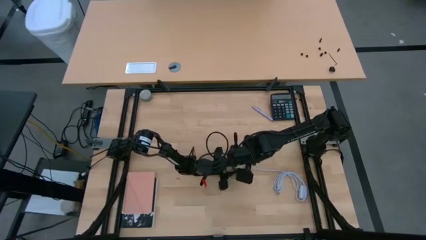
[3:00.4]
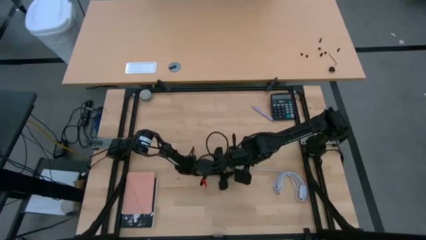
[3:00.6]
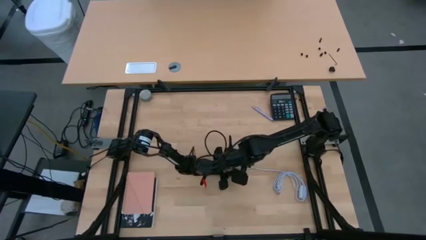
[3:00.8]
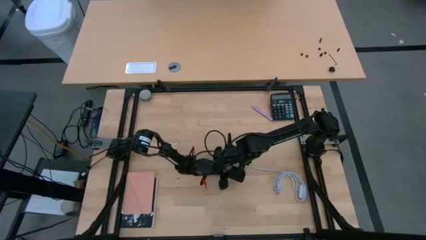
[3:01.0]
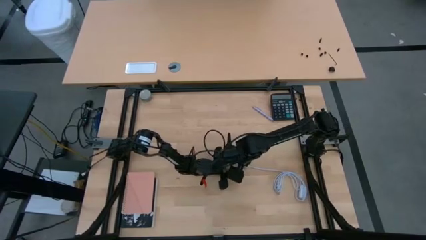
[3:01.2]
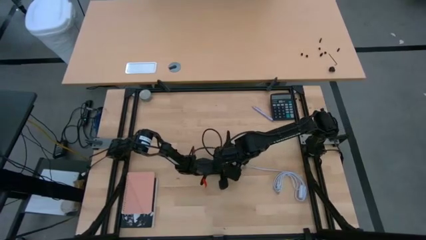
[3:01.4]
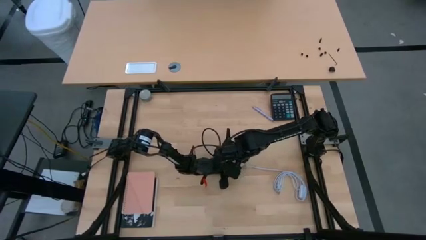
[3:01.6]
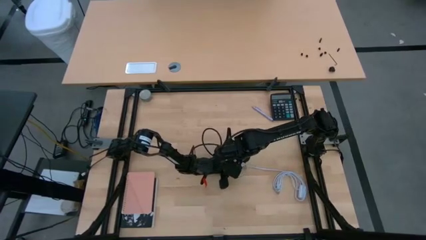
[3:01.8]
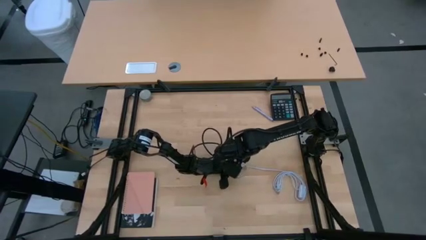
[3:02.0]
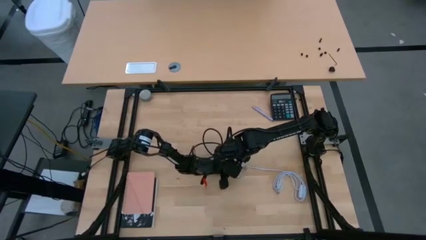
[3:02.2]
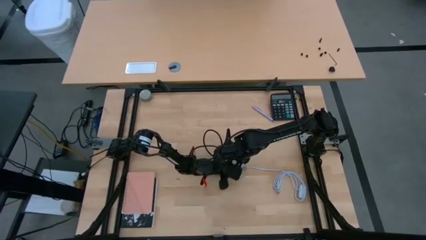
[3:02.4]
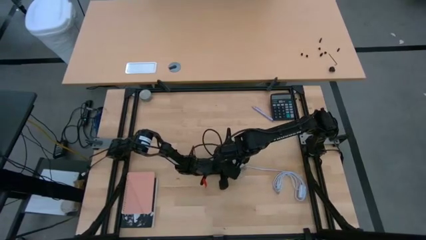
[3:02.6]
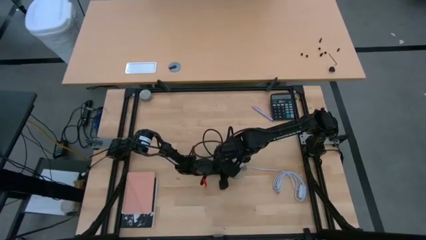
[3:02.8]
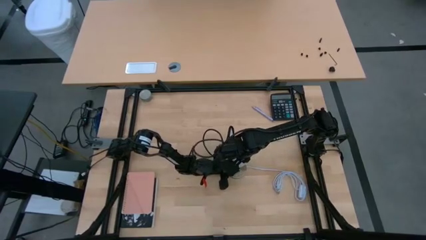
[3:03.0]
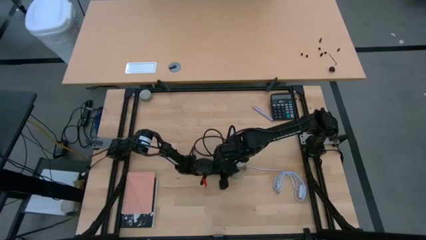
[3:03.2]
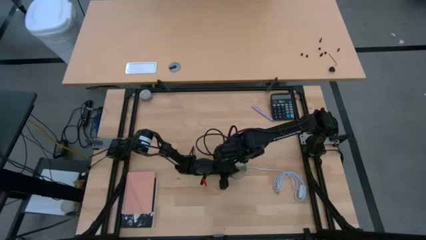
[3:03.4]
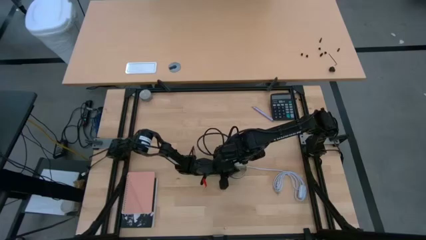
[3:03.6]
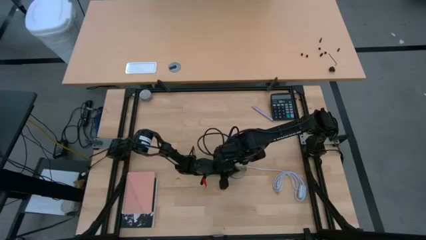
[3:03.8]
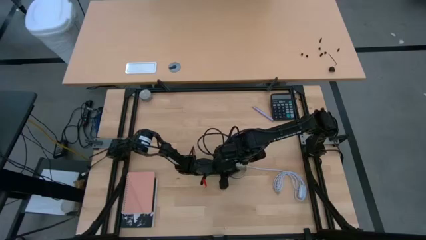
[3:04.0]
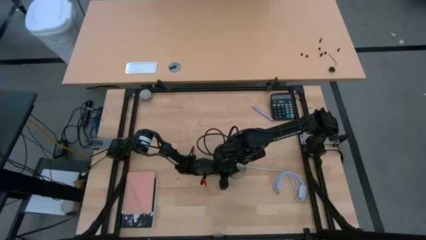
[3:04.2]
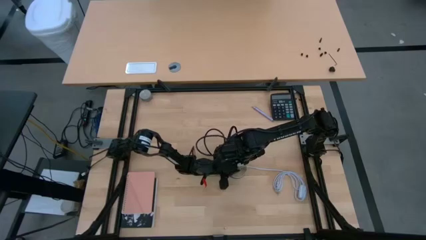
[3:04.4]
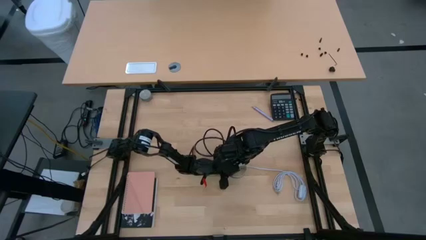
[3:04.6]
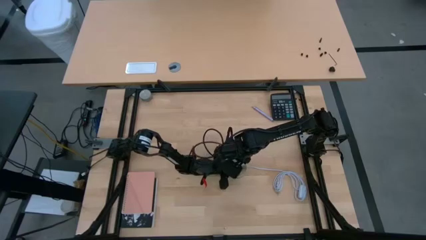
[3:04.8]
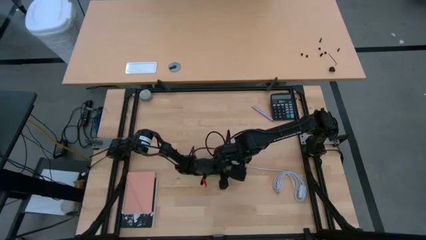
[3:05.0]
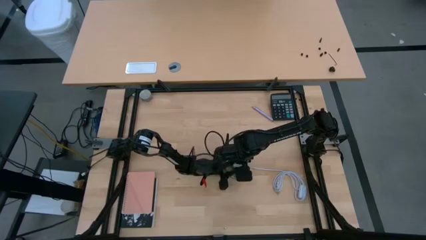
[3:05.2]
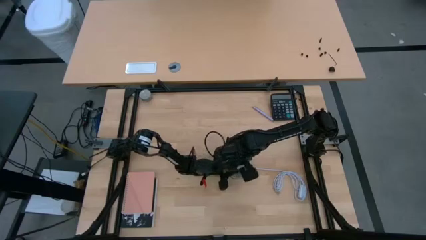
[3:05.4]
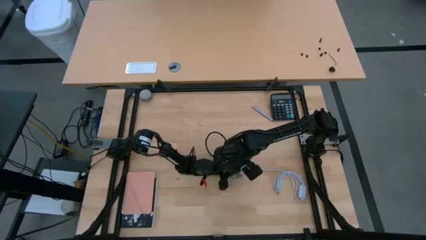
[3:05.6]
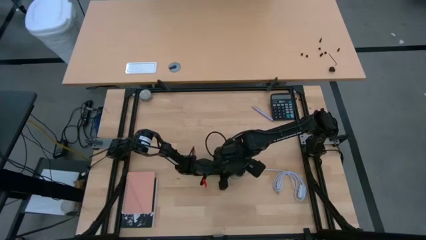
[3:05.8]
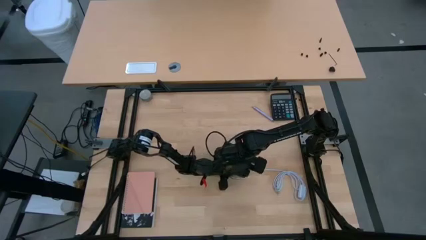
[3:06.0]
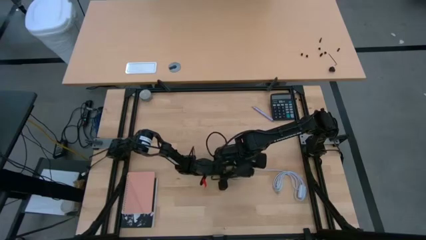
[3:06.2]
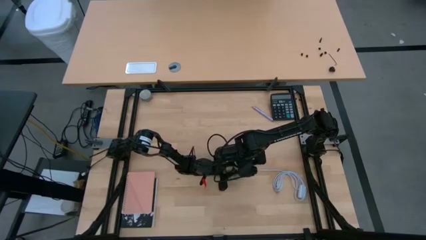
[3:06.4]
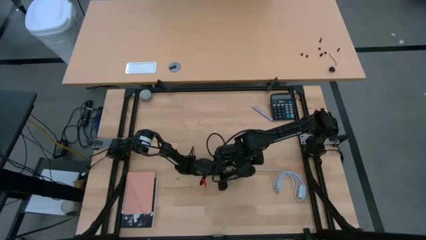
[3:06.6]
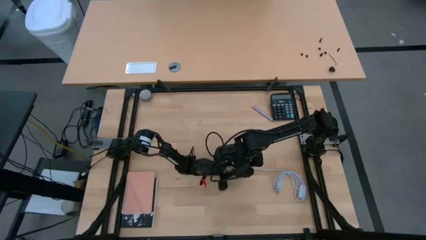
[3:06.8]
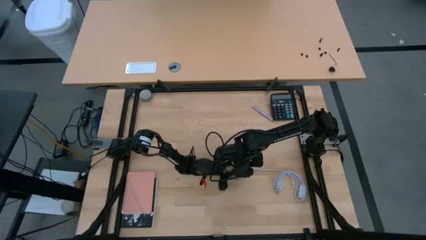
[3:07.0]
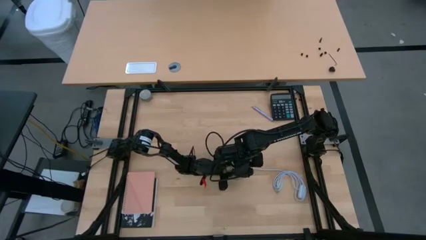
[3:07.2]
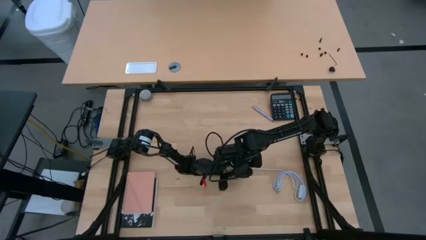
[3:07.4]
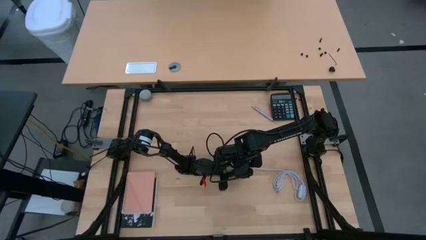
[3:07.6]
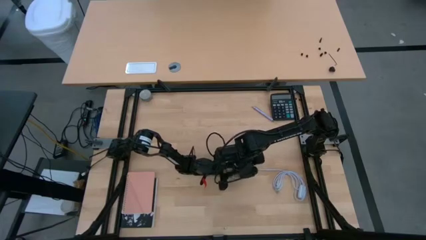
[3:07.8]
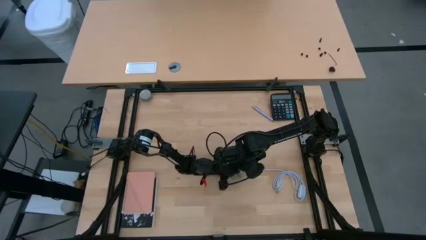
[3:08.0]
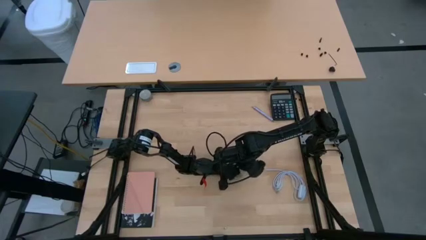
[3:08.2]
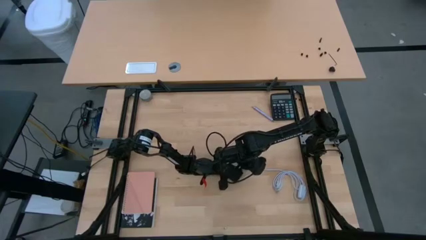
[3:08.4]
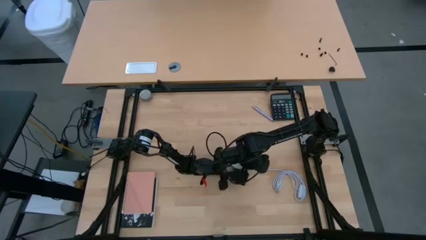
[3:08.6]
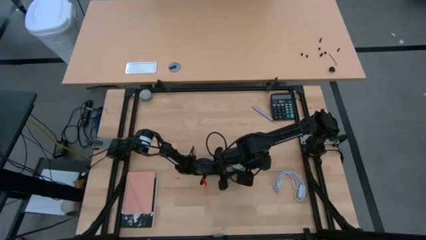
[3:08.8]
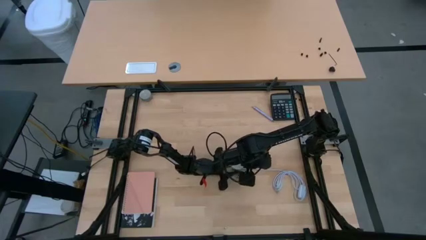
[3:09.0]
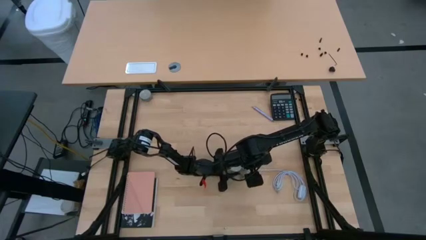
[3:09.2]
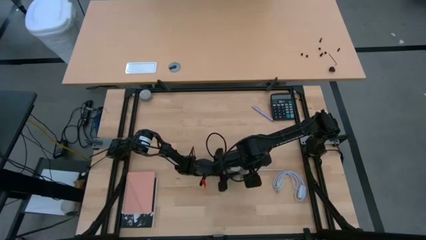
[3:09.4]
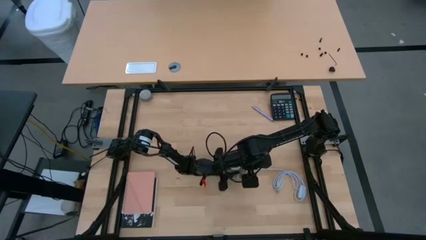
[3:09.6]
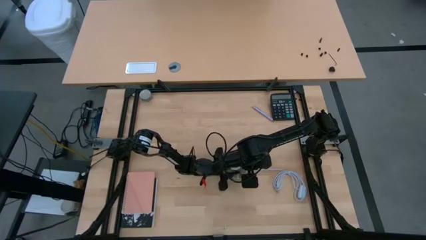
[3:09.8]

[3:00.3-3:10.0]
Task: Screw lightbulb
Remove the lightbulb from the lamp

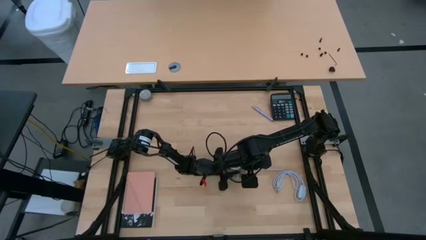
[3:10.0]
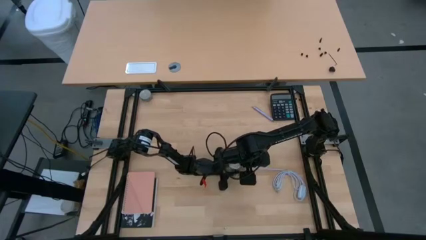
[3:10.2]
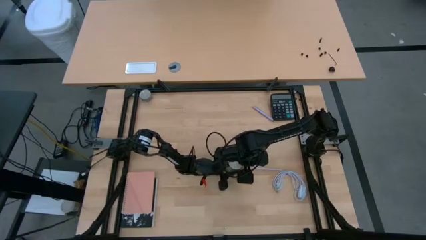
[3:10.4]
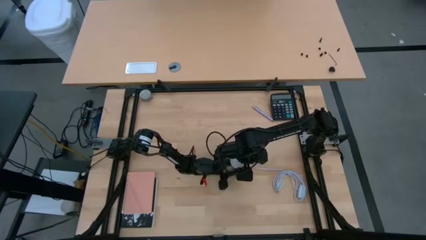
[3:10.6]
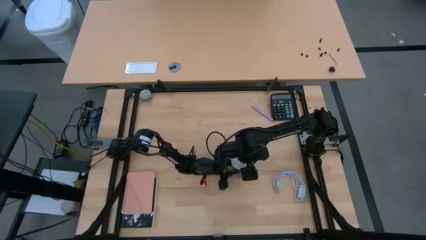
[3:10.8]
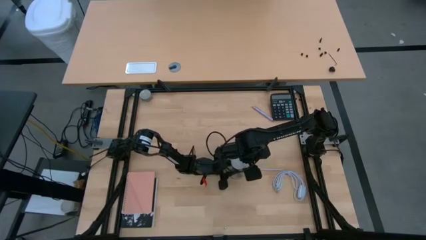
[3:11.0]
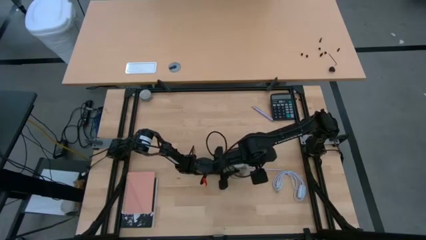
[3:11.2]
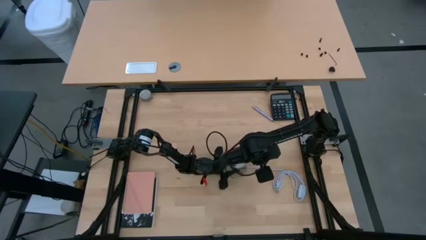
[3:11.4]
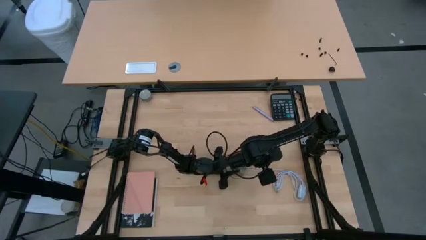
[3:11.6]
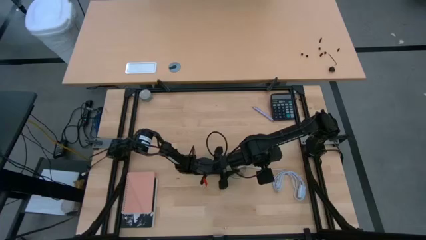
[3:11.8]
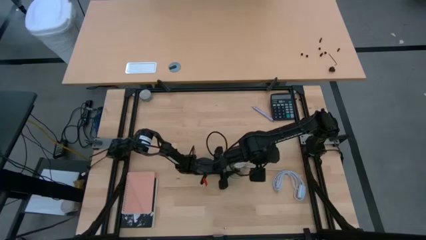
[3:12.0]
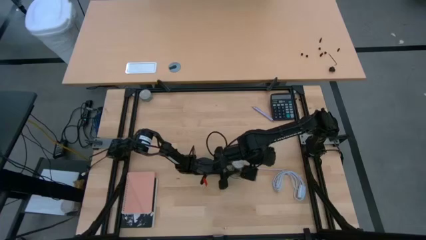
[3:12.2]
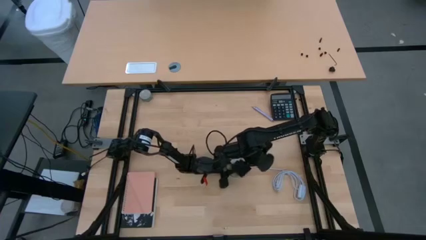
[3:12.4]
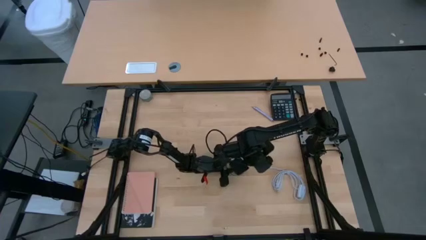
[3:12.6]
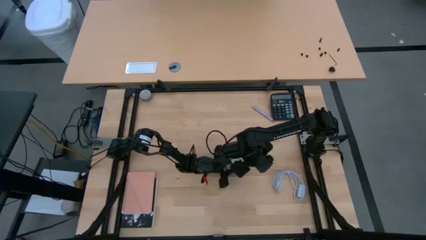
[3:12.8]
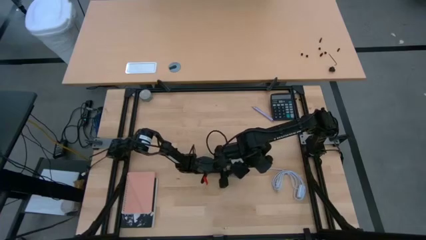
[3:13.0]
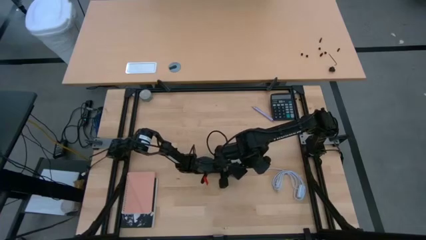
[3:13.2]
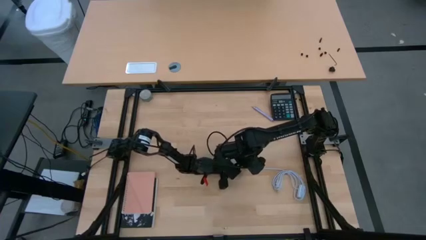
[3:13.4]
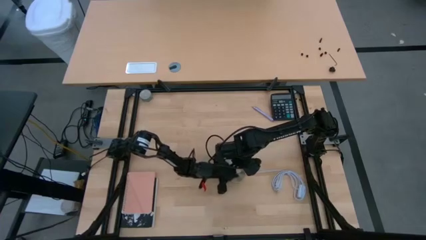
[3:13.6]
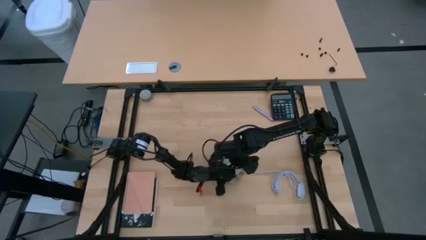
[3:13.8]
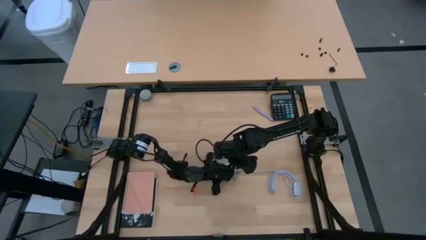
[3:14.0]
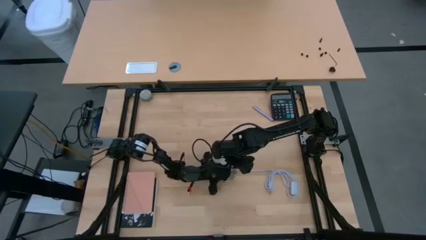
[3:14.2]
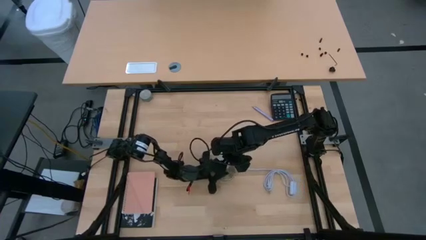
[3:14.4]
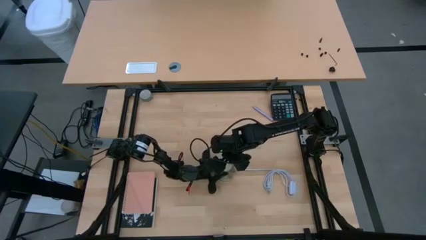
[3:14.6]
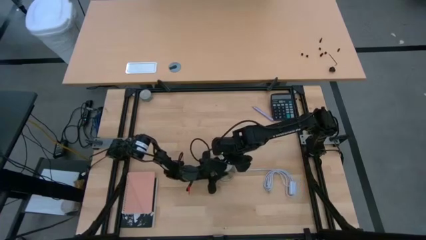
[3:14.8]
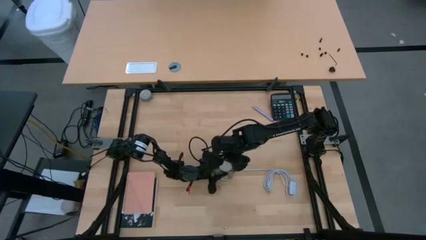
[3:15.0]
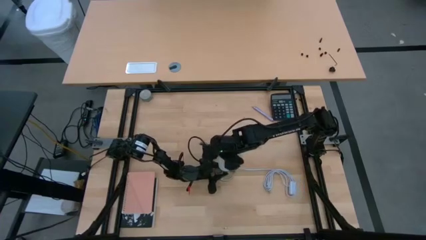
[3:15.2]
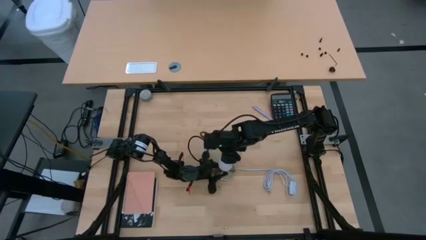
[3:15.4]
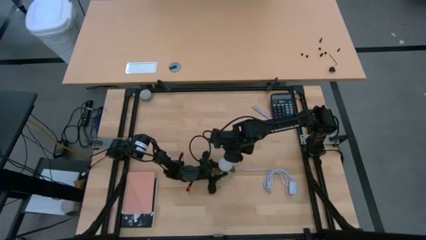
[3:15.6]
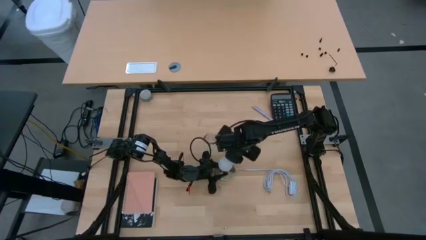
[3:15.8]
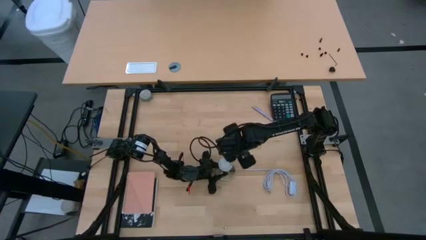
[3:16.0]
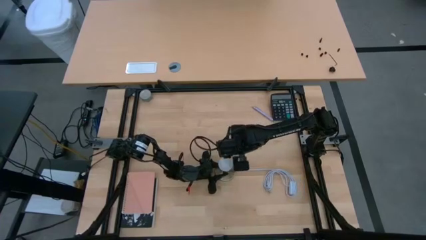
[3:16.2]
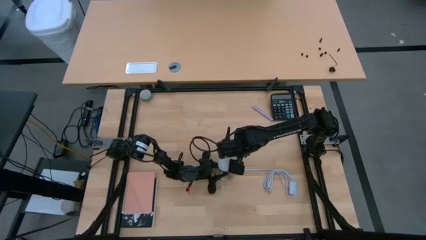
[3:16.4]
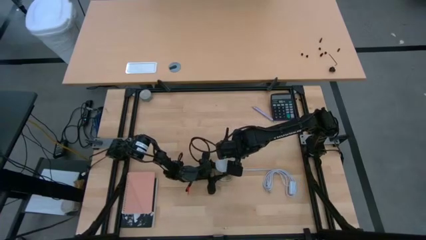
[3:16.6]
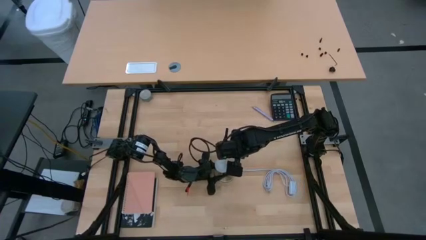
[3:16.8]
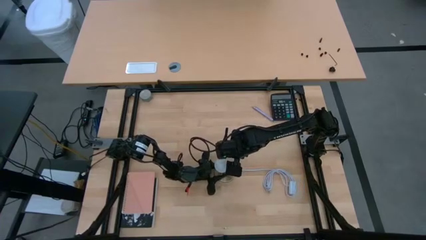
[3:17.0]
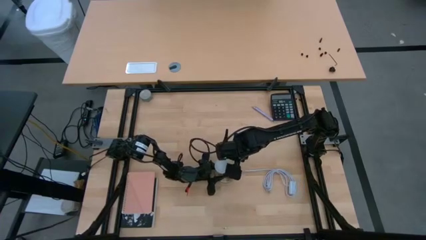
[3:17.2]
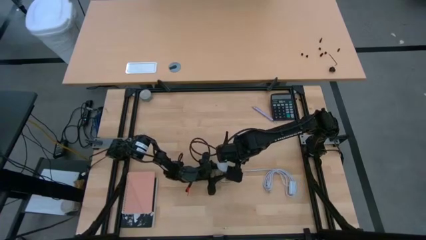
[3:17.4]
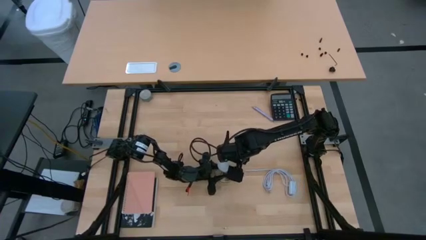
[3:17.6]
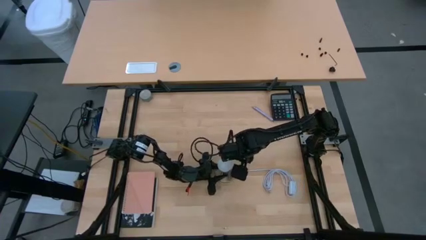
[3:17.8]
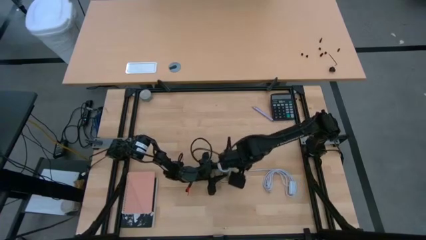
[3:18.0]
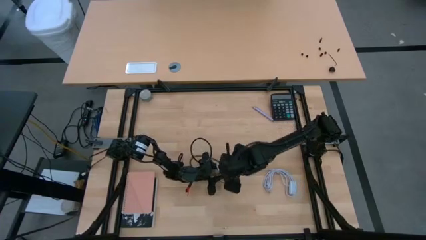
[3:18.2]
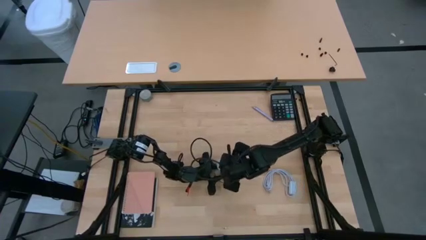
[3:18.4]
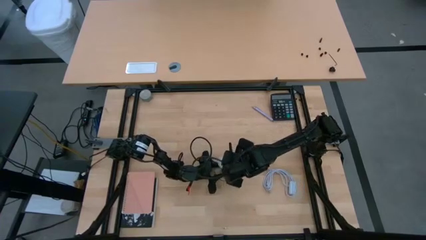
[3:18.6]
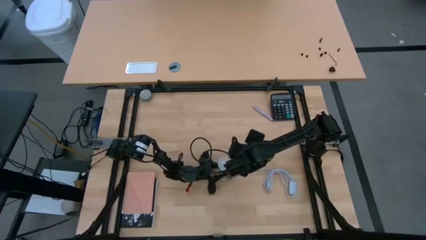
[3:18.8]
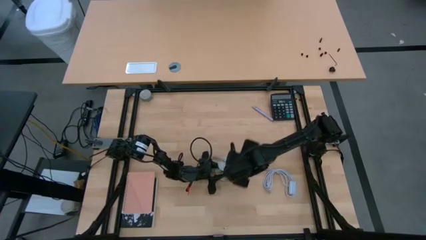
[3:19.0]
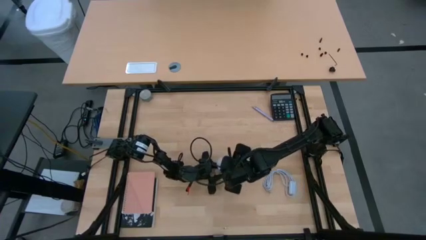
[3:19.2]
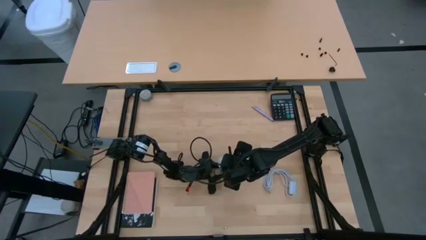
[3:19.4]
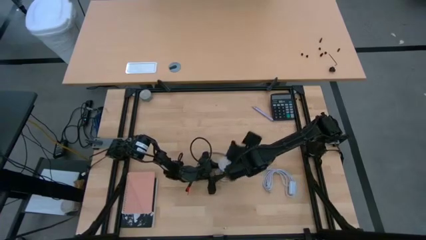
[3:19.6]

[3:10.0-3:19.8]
Remove the lightbulb from the lamp
